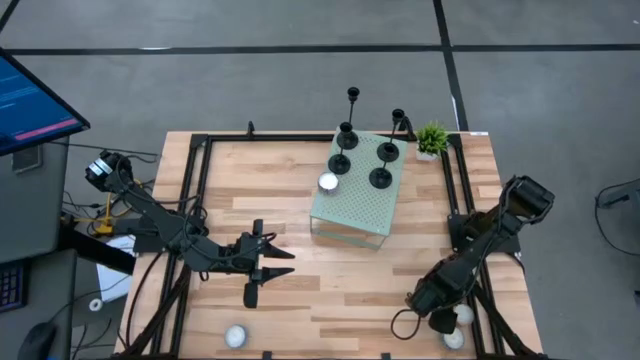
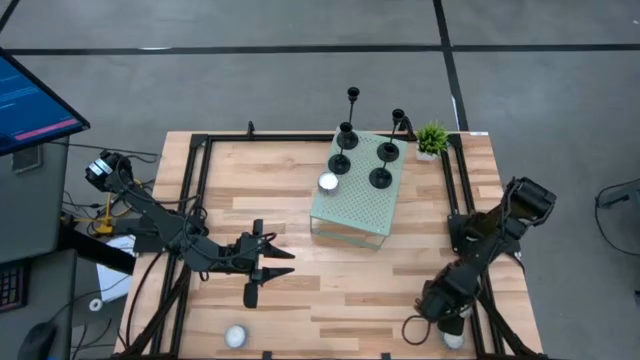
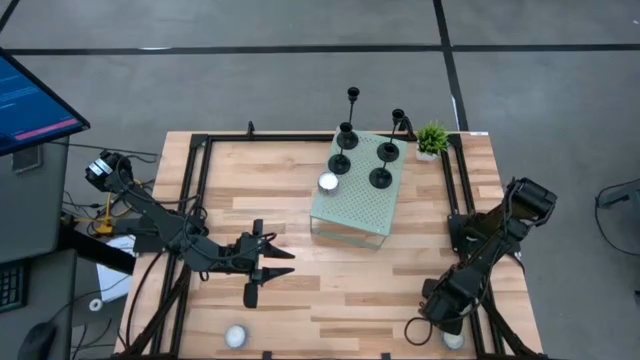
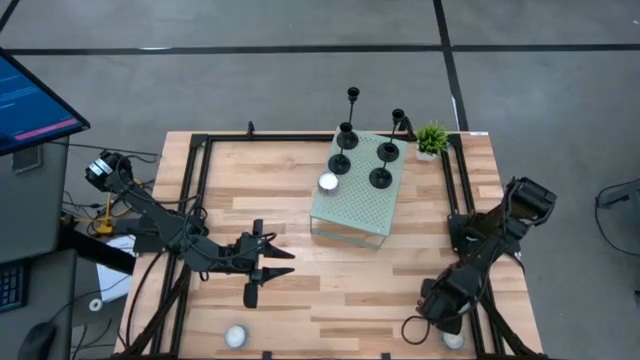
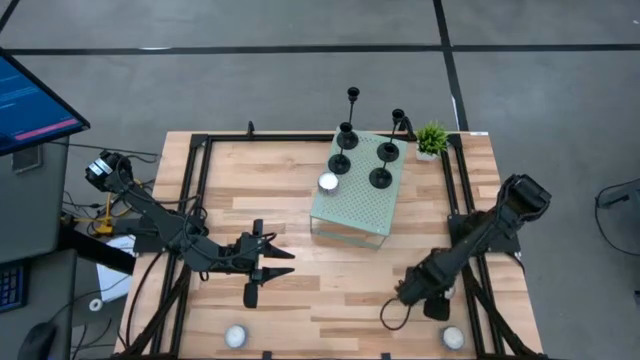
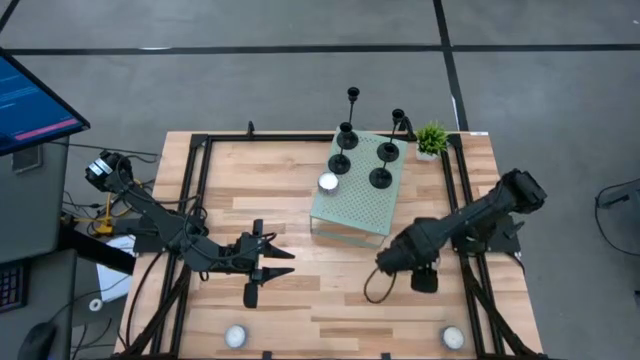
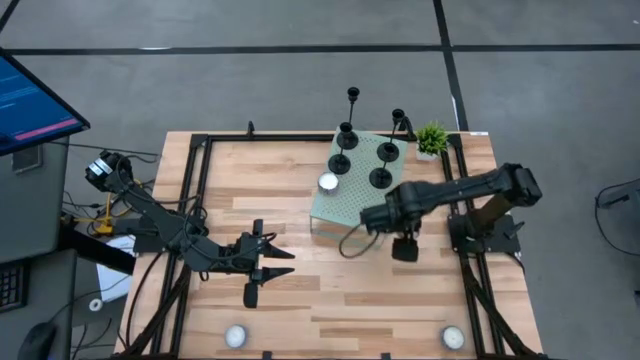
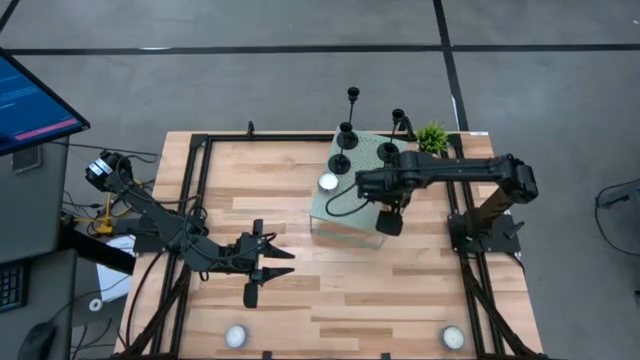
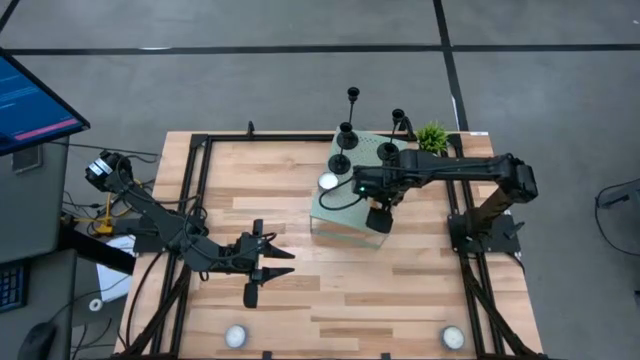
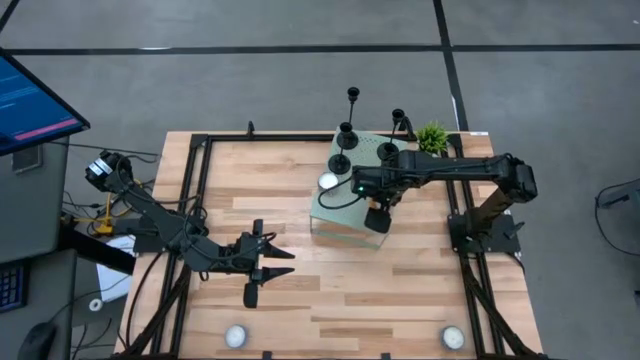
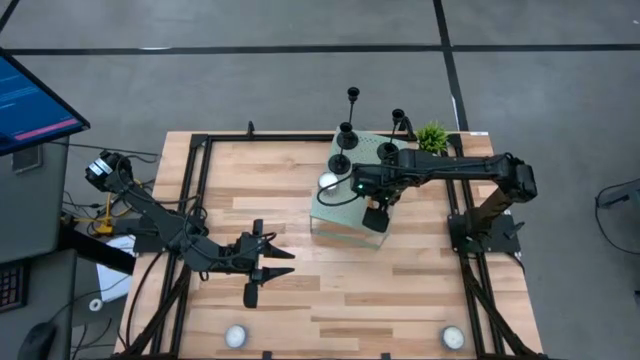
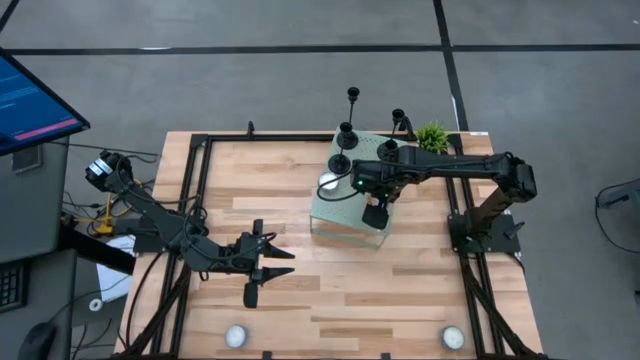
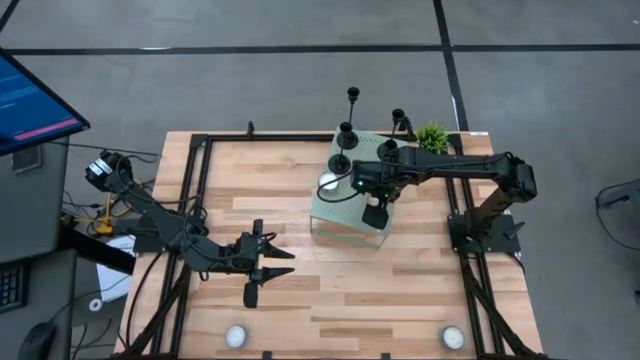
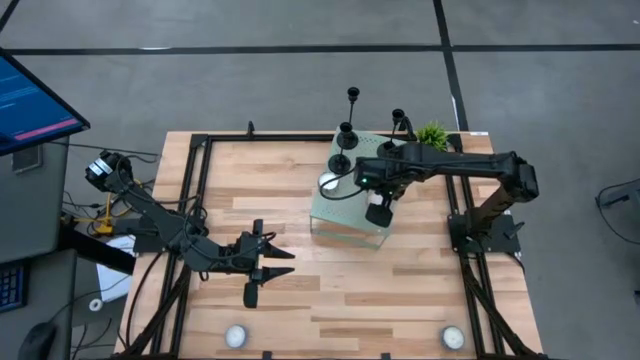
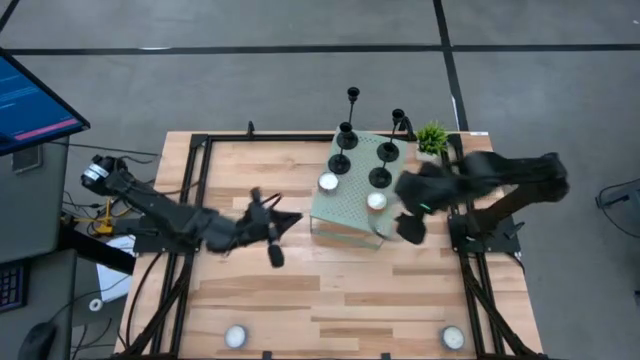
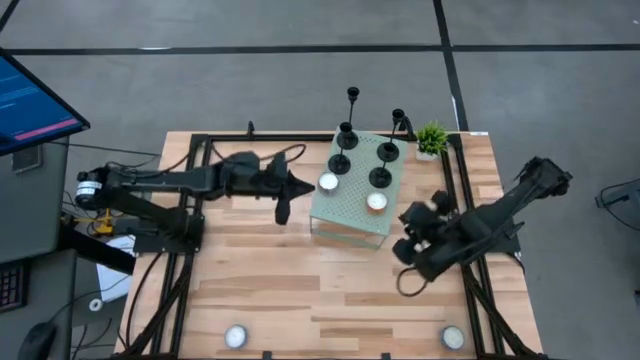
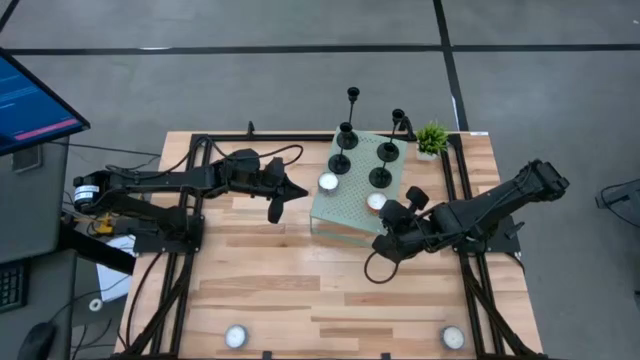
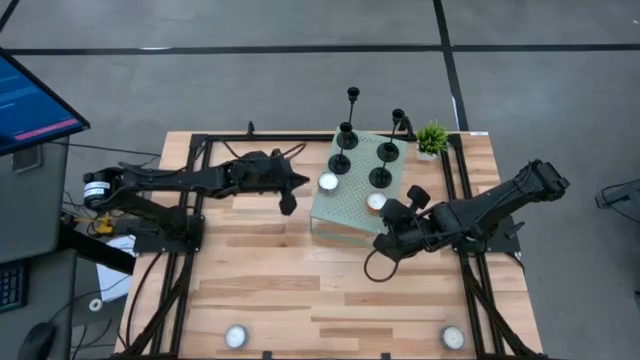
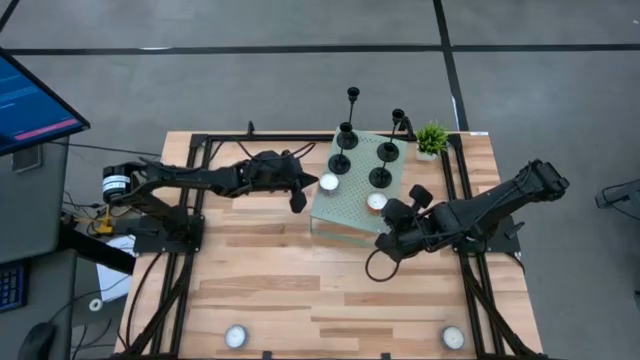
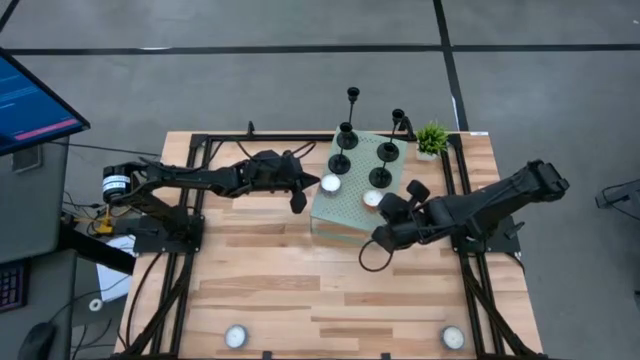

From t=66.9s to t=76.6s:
Task: Pick & Place candle stick holders
Put the orange patterned scented candle on the shelf

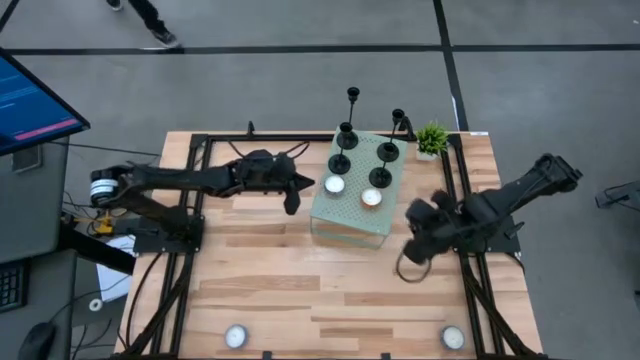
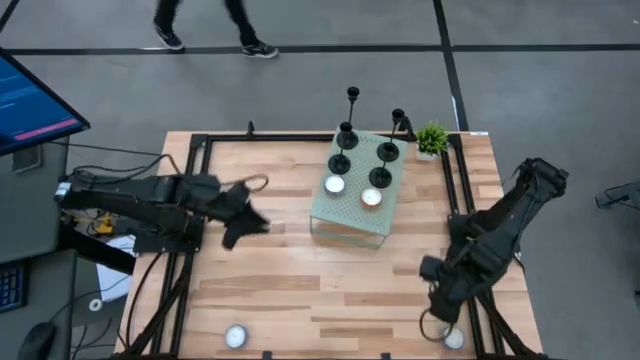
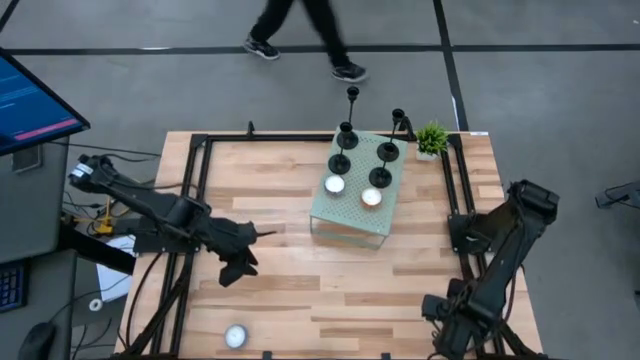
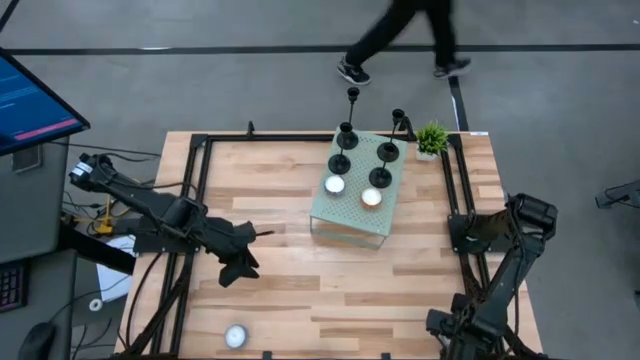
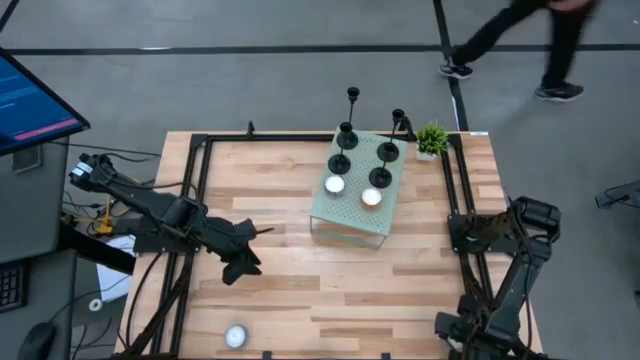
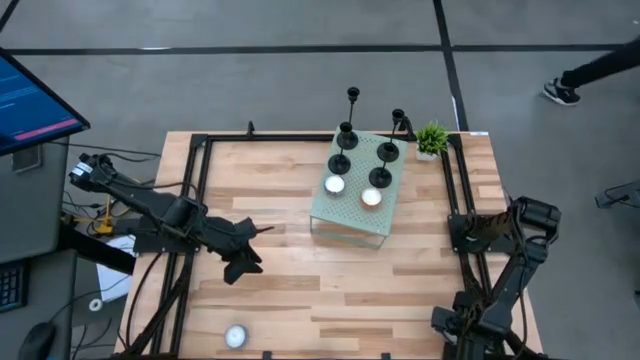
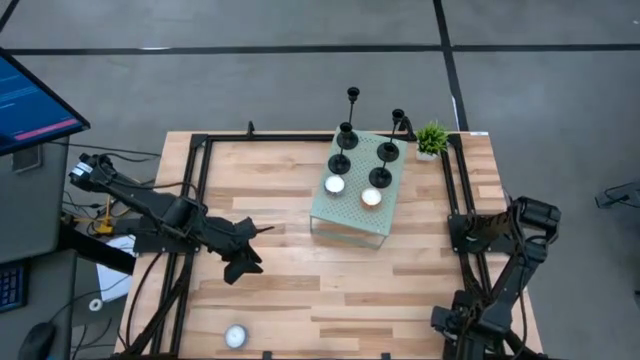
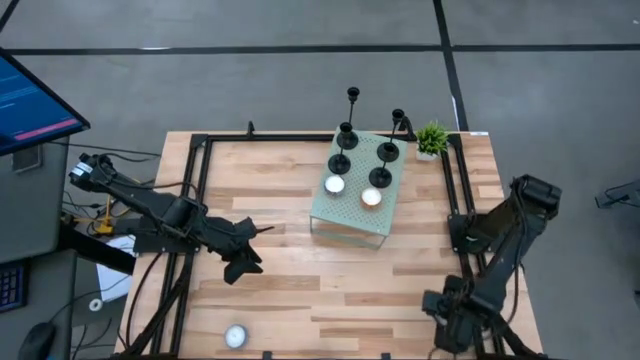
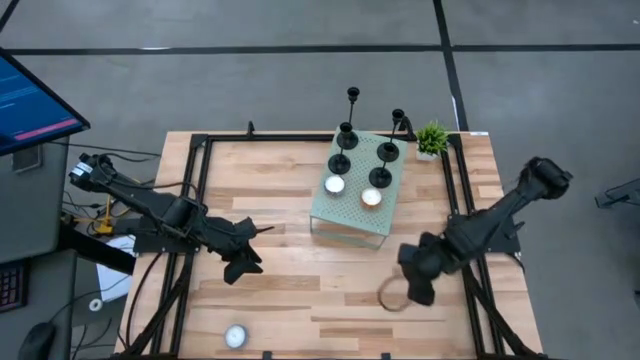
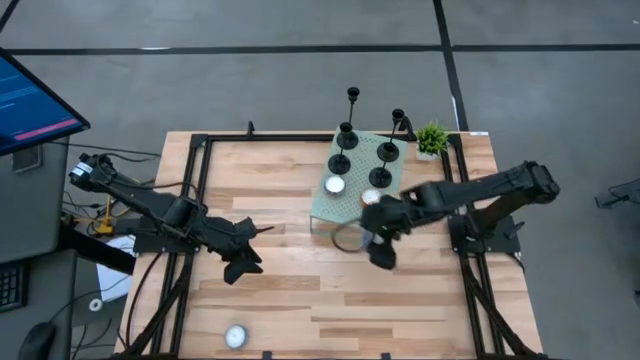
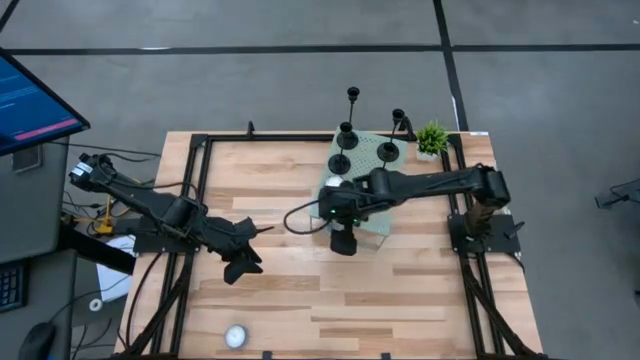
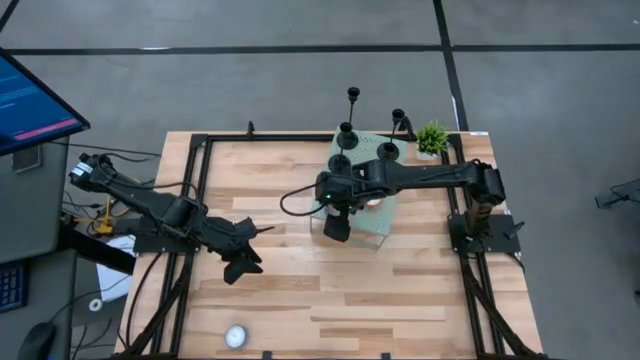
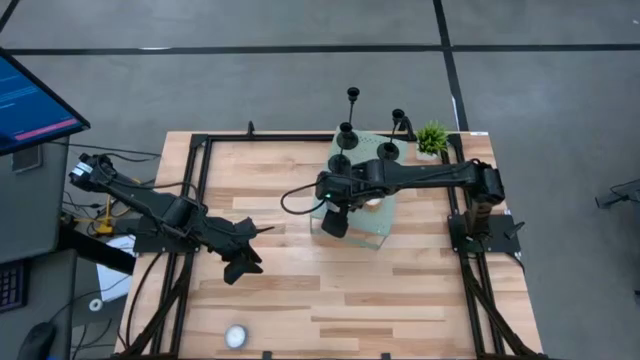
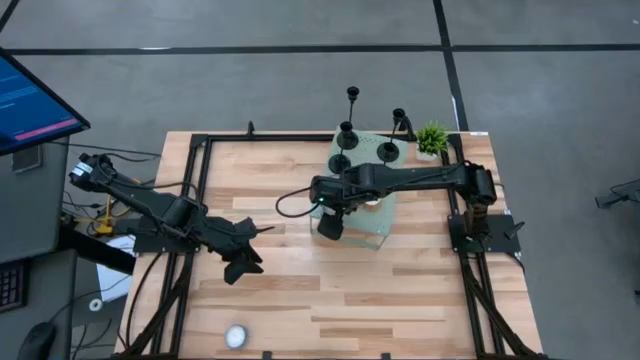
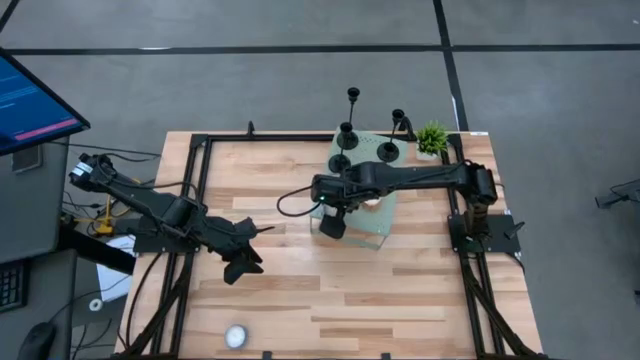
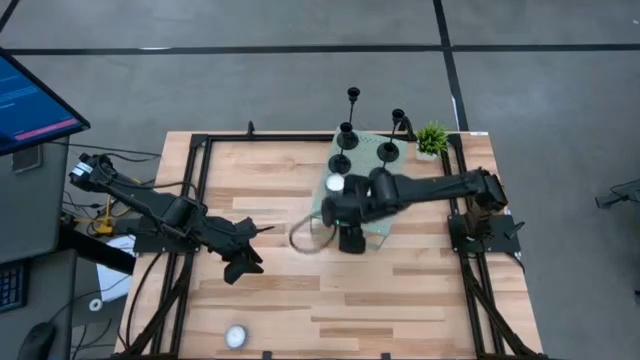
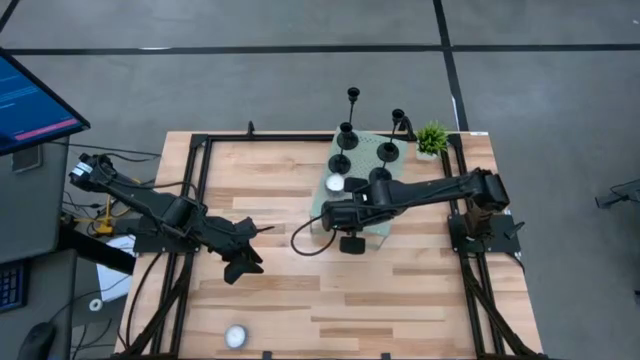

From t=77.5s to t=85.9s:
Put the blue patterned scented candle on the shelf
